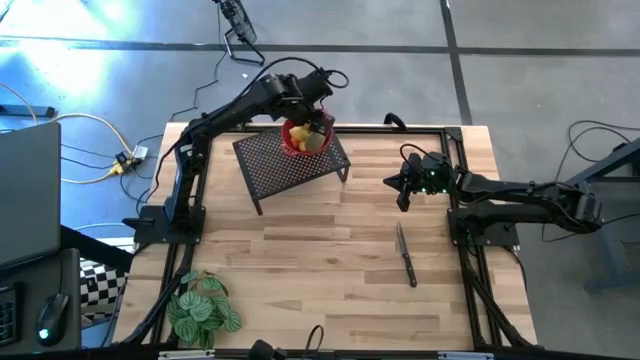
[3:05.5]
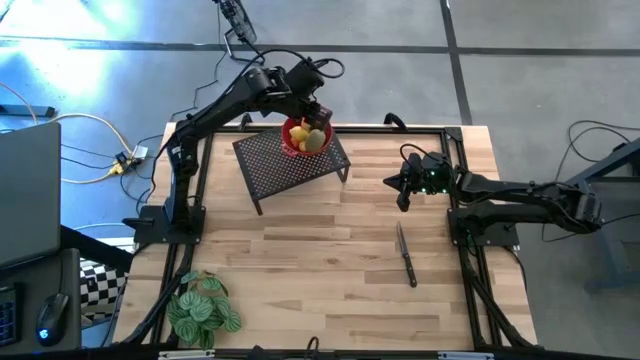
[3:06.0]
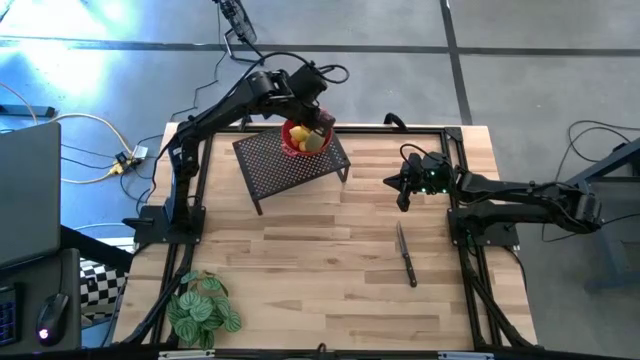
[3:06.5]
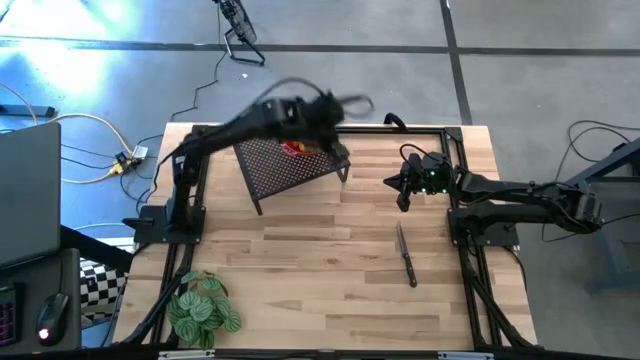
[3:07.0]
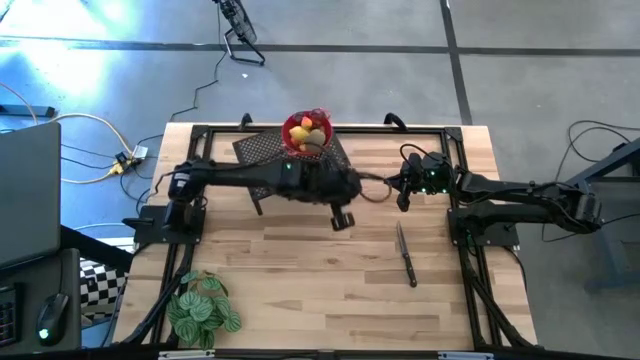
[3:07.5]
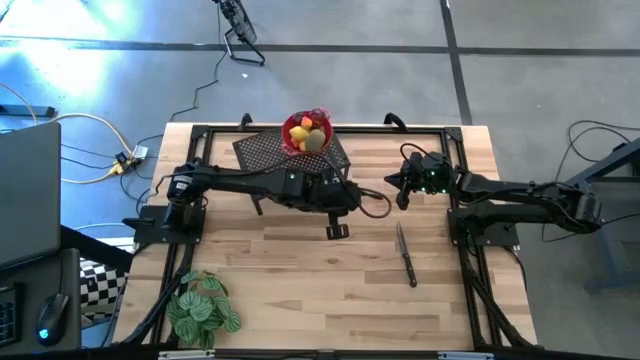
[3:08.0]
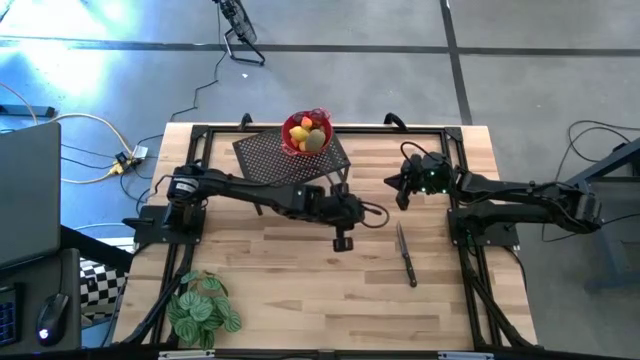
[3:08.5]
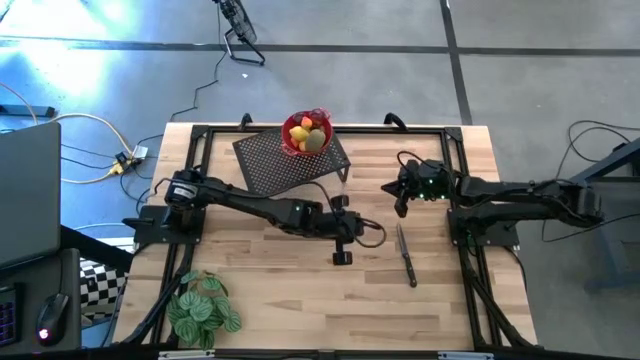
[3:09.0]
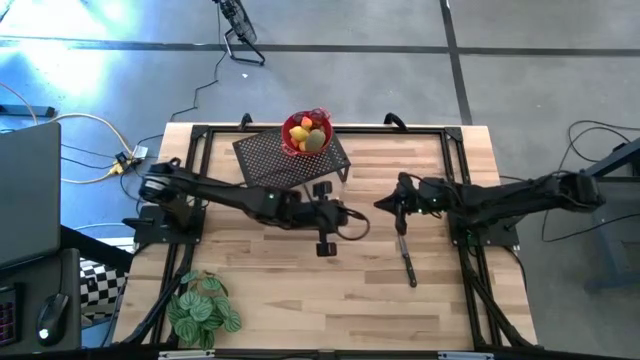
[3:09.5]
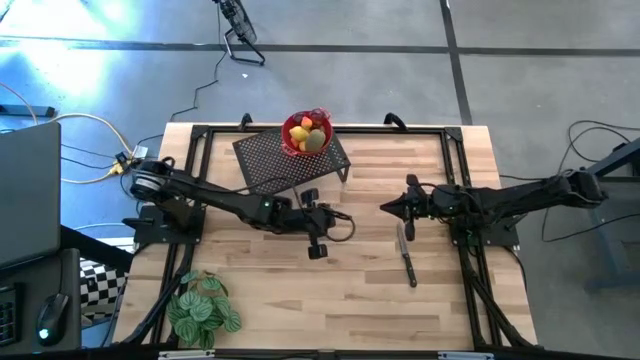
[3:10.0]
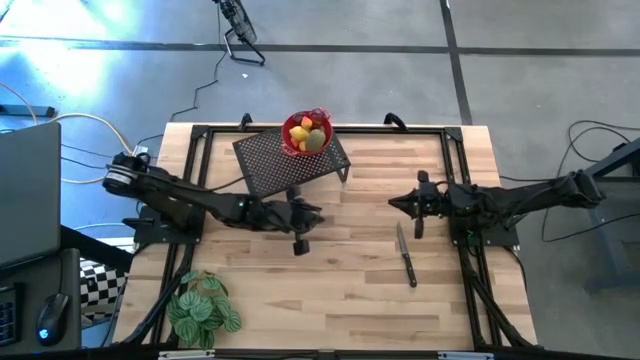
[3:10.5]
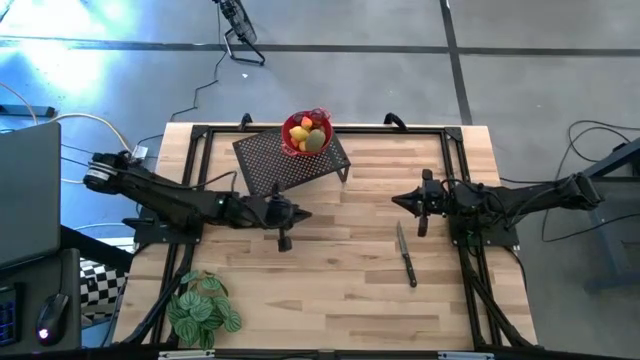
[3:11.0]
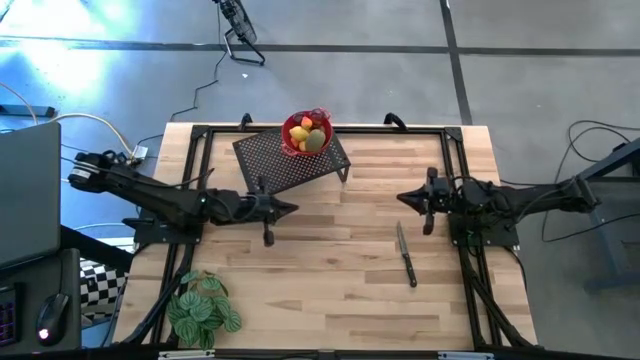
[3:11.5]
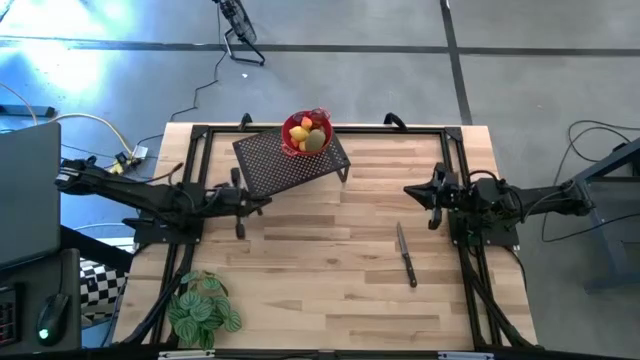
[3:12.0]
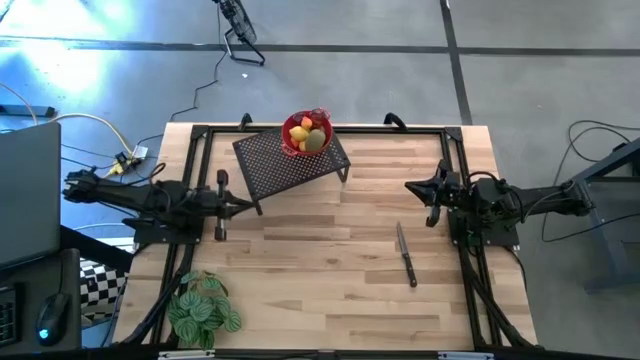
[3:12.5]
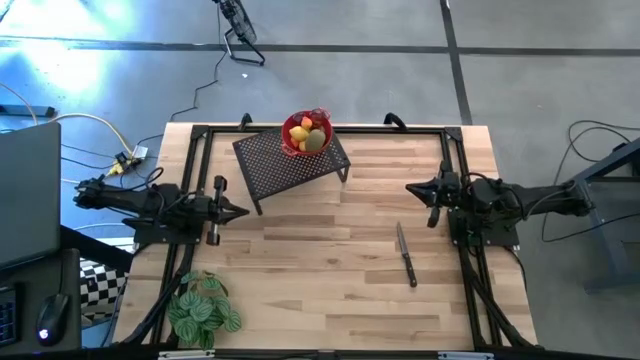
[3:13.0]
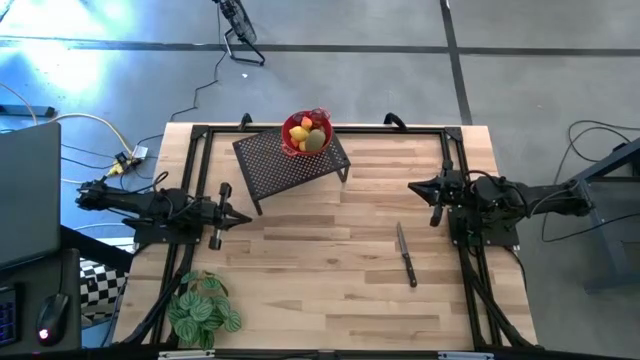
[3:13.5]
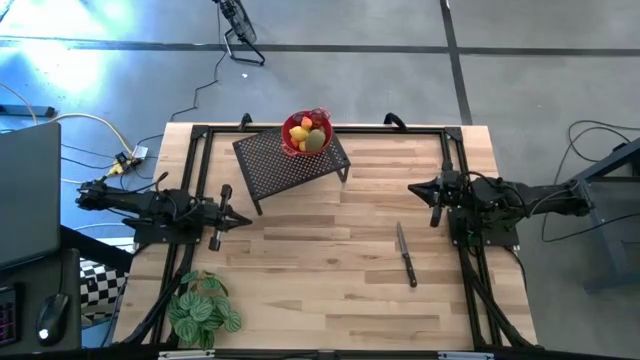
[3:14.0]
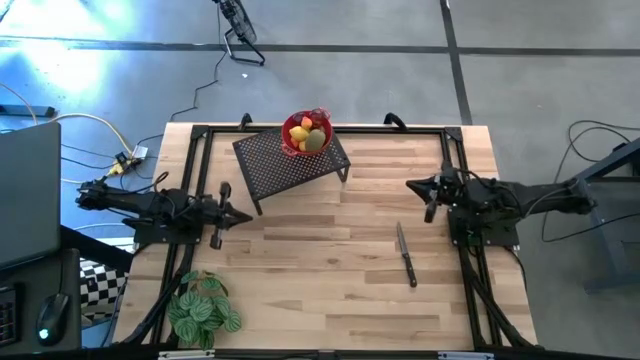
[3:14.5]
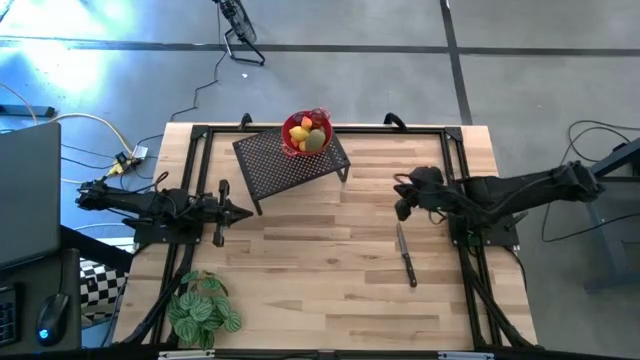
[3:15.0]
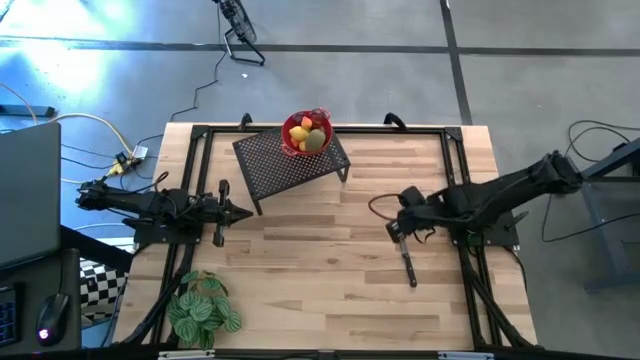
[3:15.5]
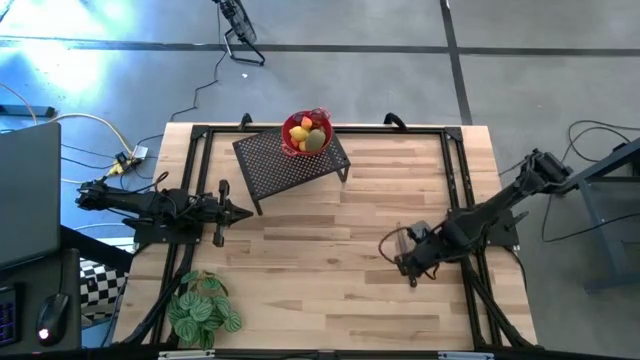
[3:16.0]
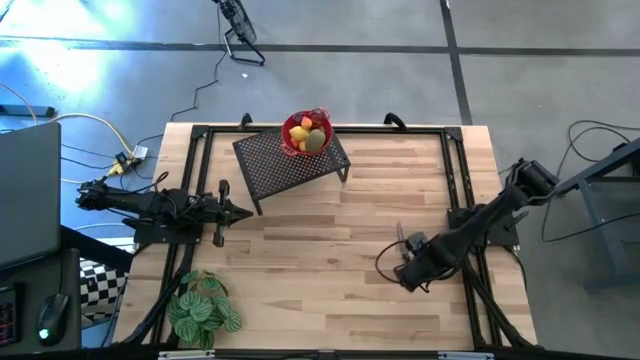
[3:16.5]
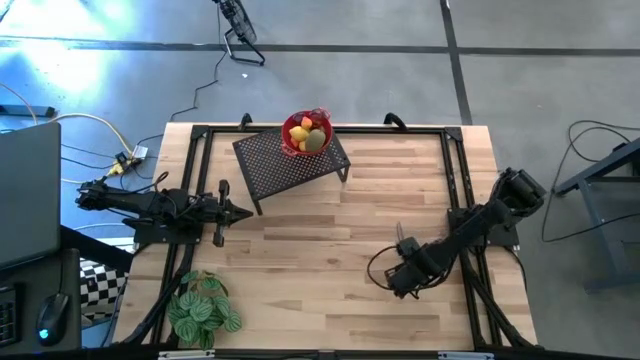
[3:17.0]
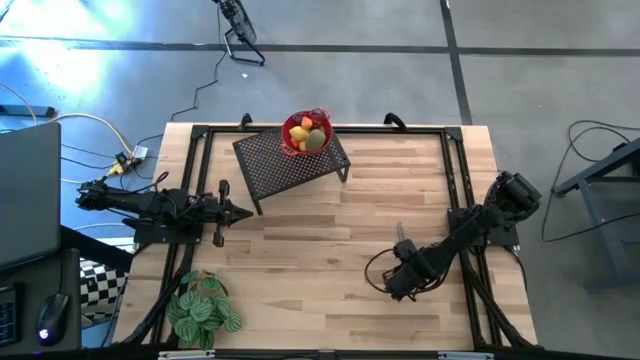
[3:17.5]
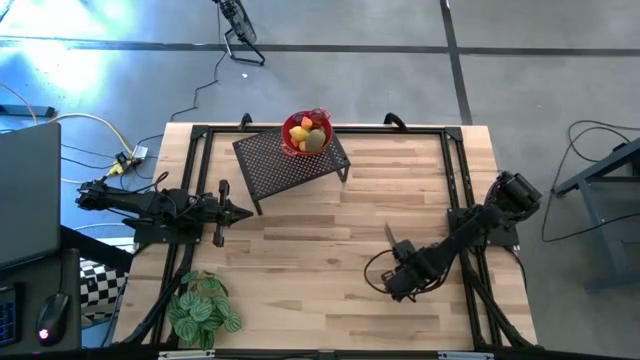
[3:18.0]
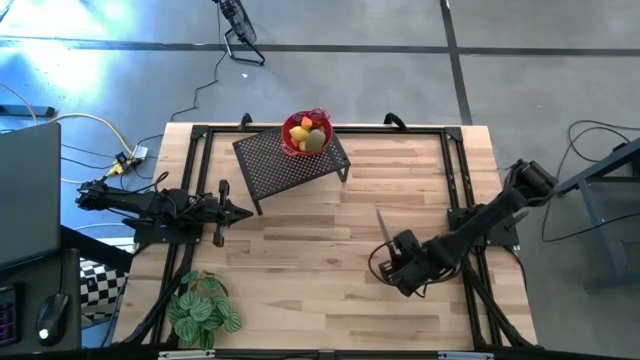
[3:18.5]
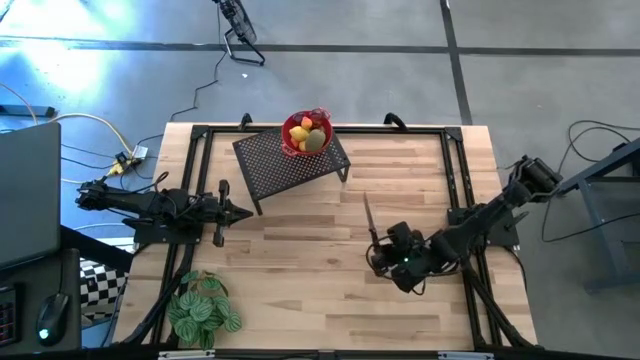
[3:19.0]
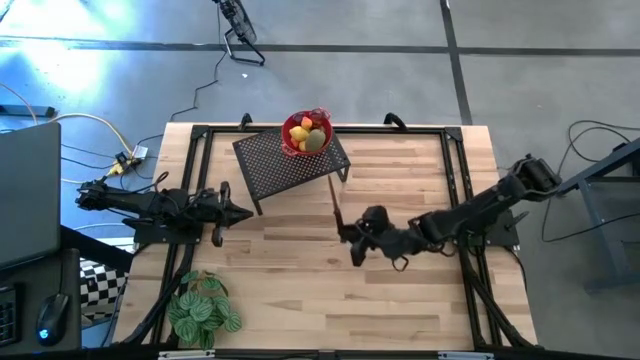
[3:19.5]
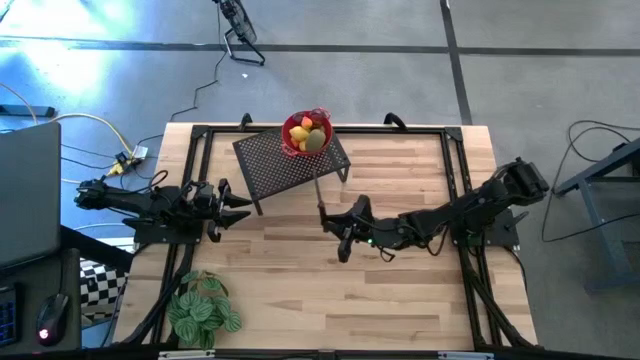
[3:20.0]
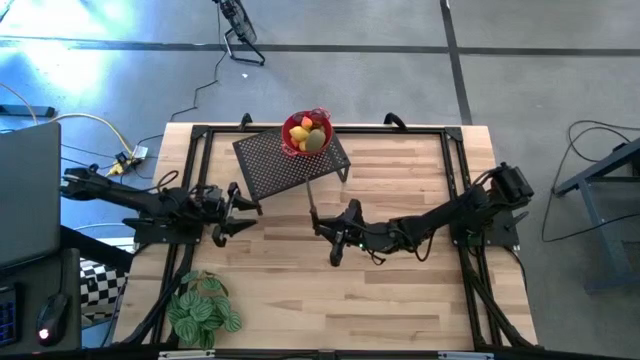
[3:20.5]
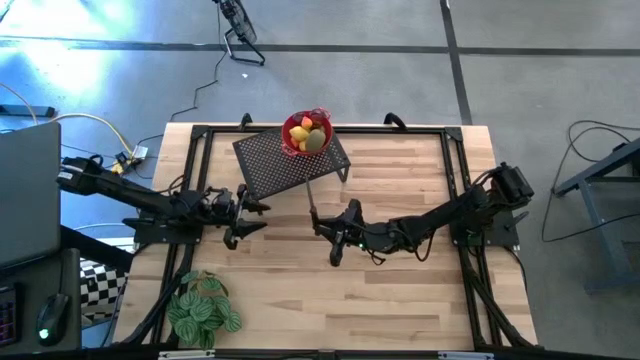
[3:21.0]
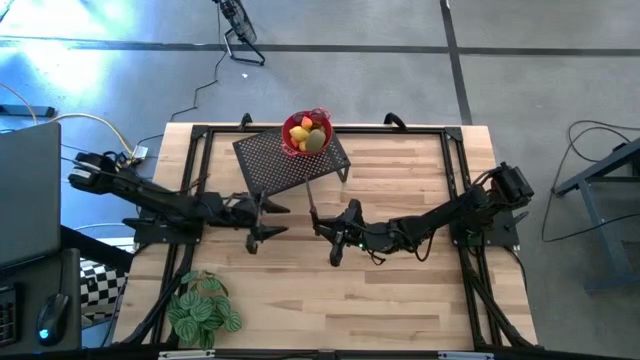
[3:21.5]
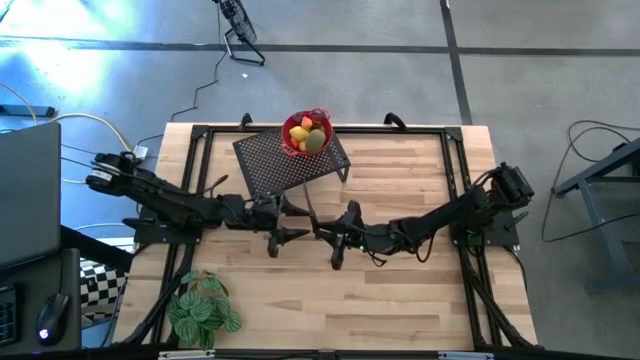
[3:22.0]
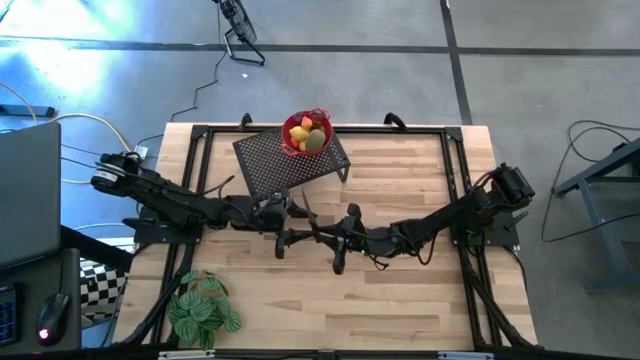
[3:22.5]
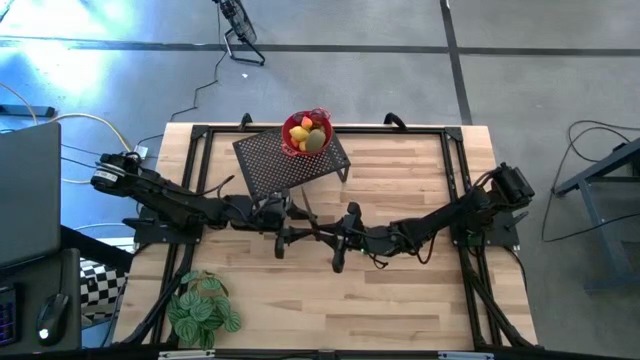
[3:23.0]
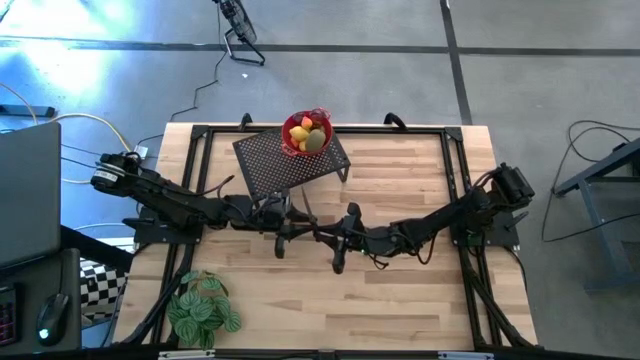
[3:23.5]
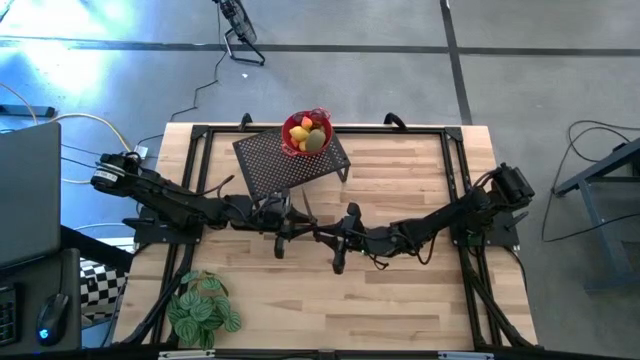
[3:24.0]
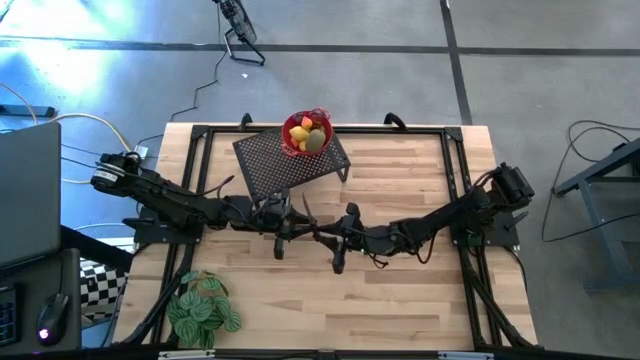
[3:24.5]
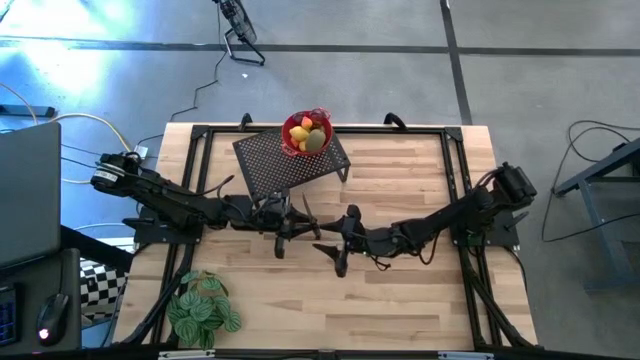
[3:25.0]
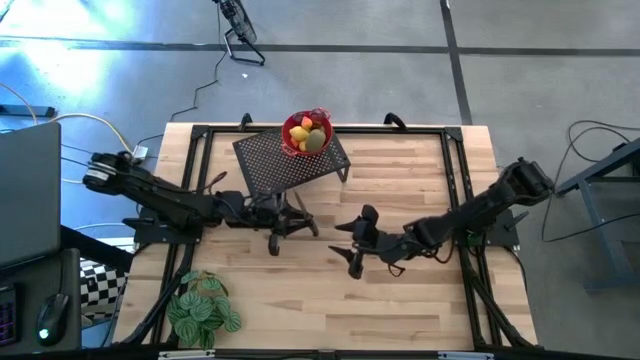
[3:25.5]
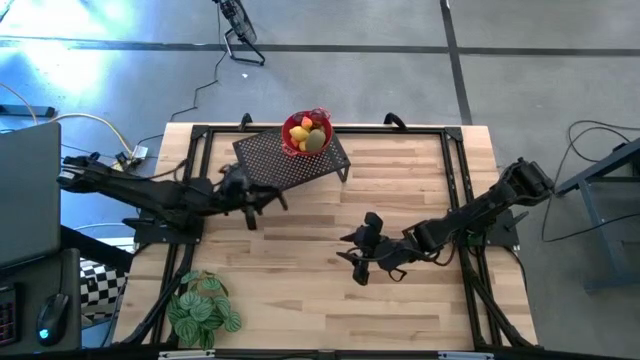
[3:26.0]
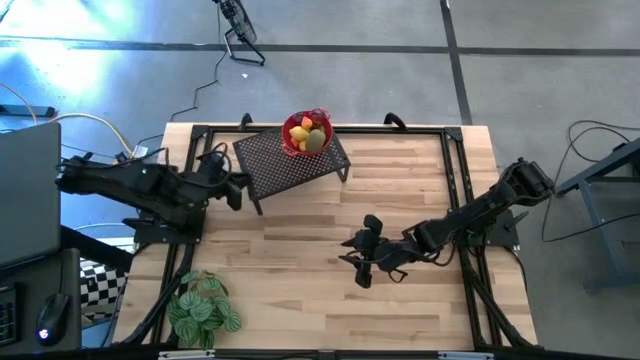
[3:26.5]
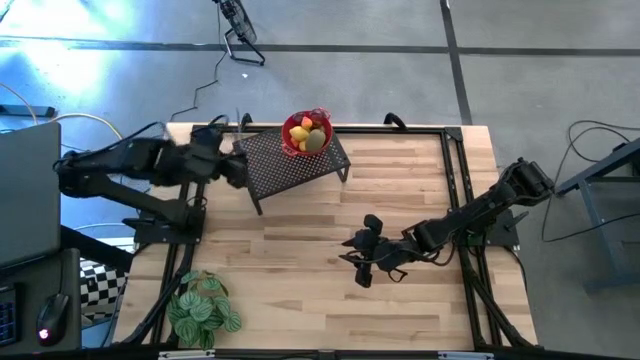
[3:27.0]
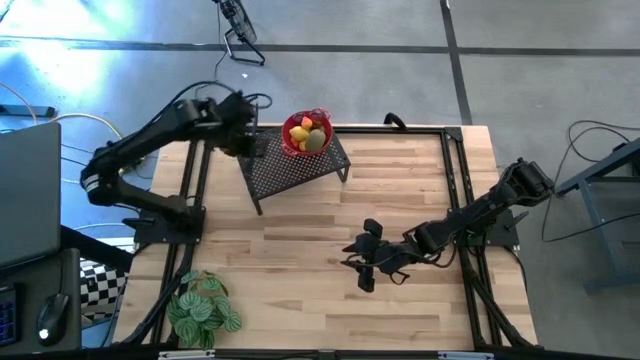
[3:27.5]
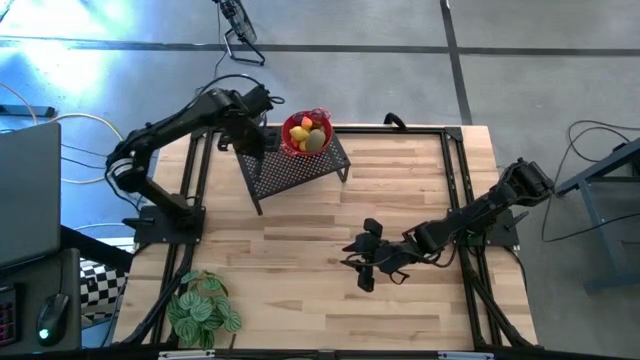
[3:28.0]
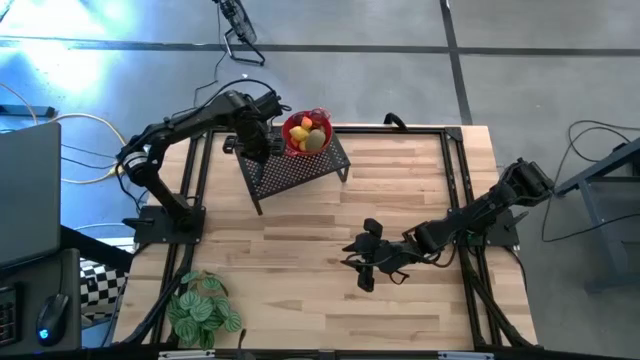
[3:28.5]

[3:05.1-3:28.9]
Task: Pick & Place Fruit
Put the knife on the shelf
